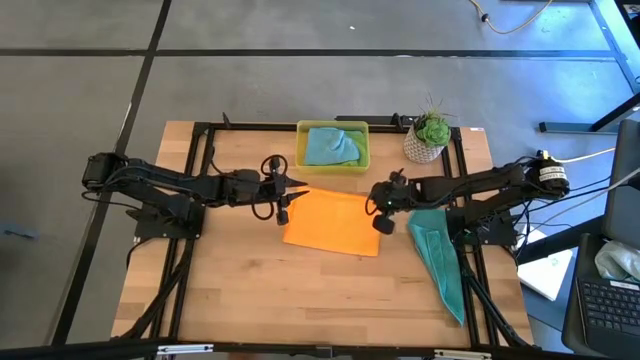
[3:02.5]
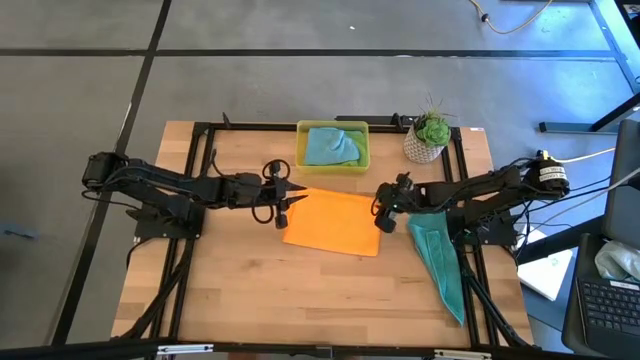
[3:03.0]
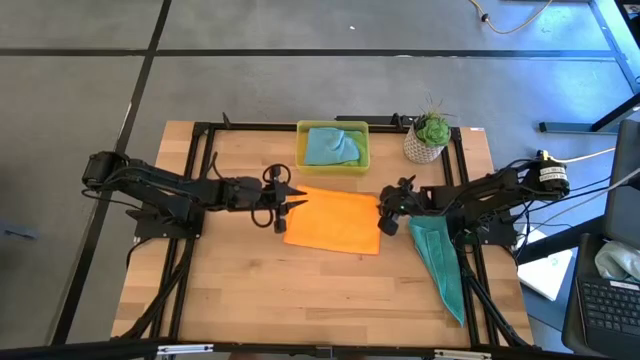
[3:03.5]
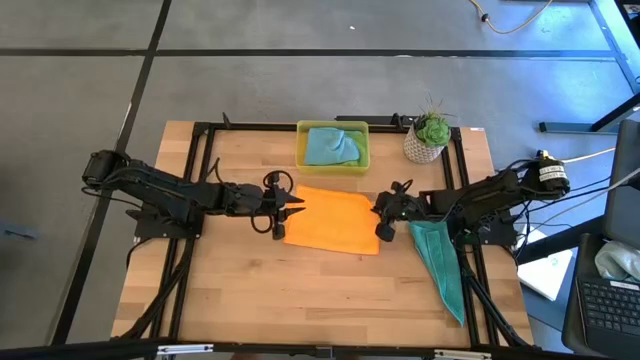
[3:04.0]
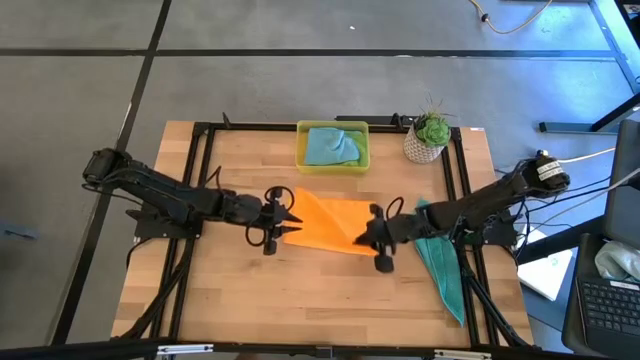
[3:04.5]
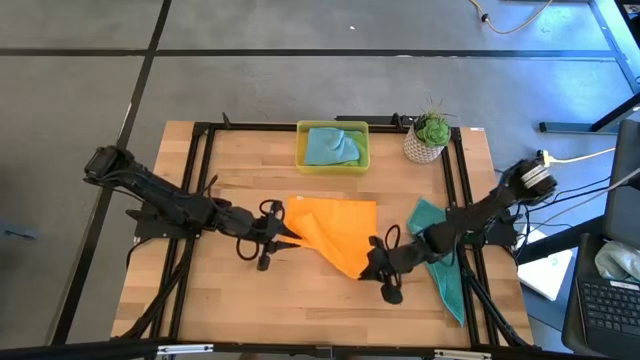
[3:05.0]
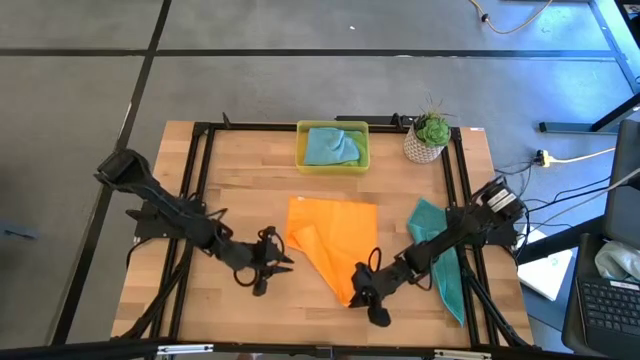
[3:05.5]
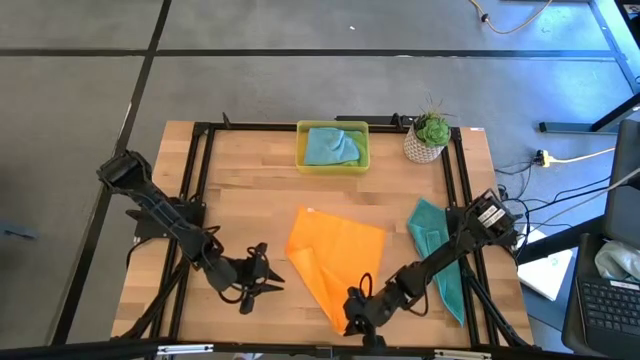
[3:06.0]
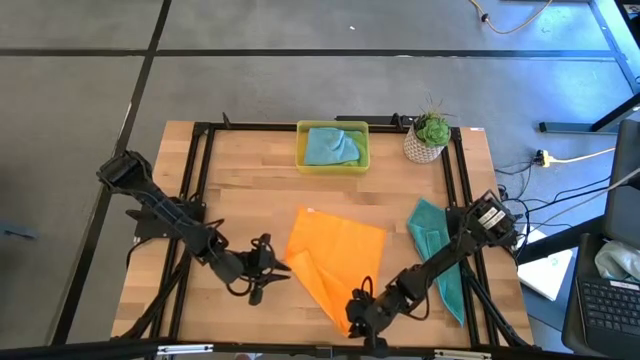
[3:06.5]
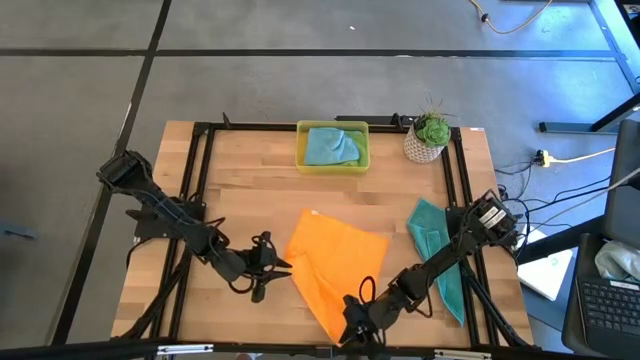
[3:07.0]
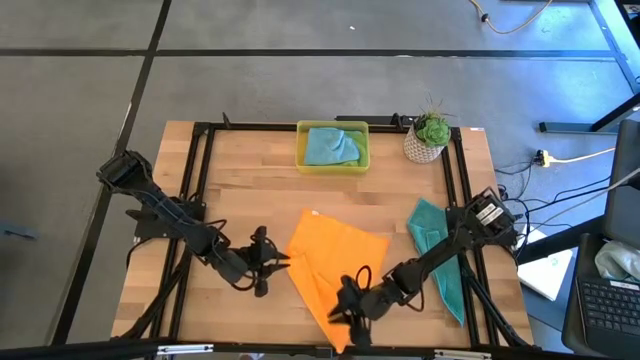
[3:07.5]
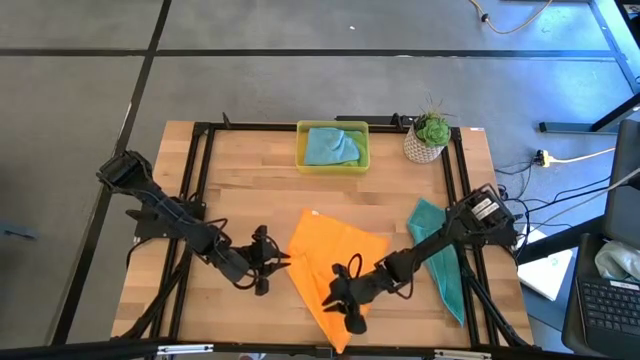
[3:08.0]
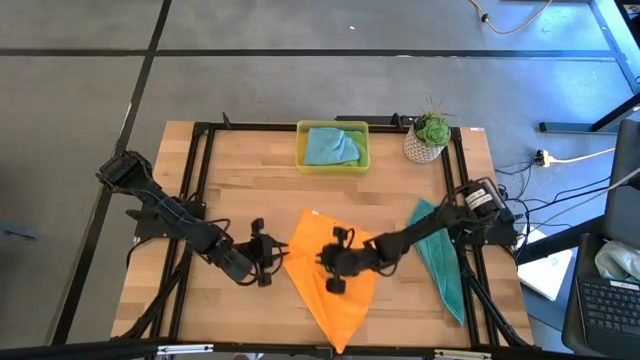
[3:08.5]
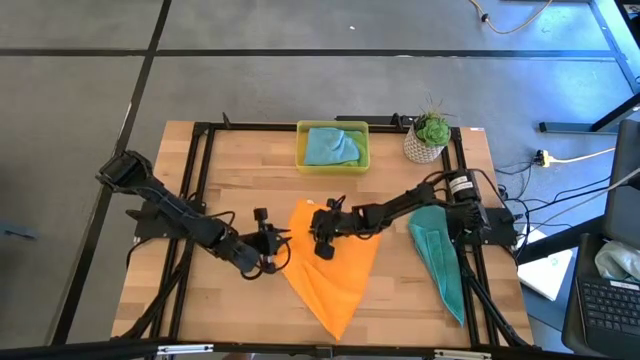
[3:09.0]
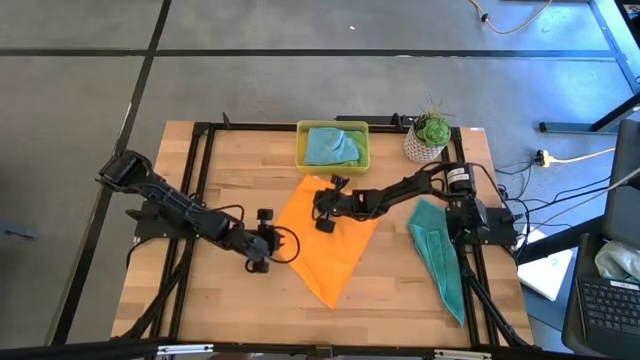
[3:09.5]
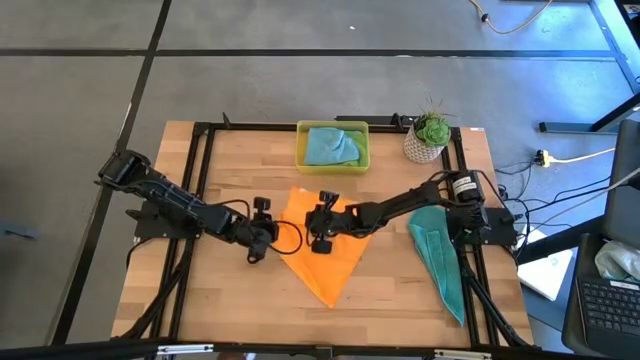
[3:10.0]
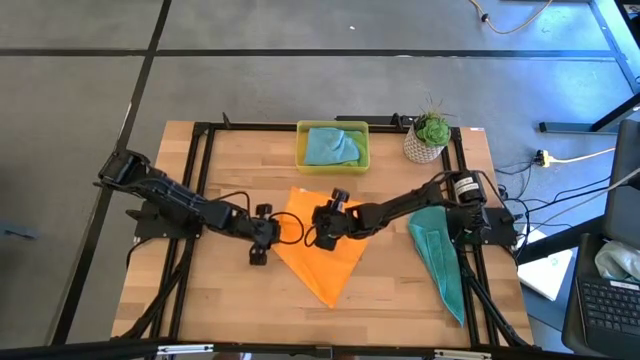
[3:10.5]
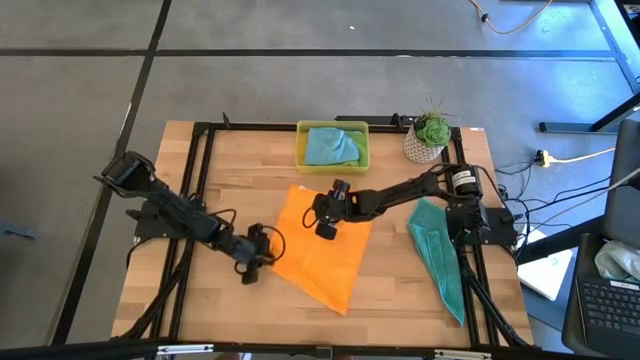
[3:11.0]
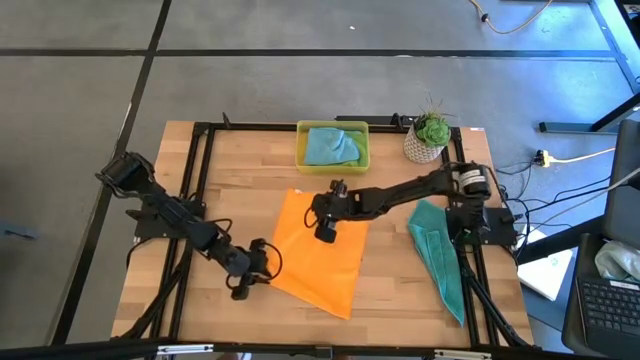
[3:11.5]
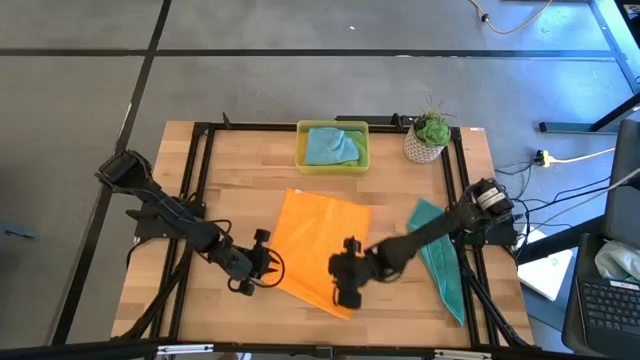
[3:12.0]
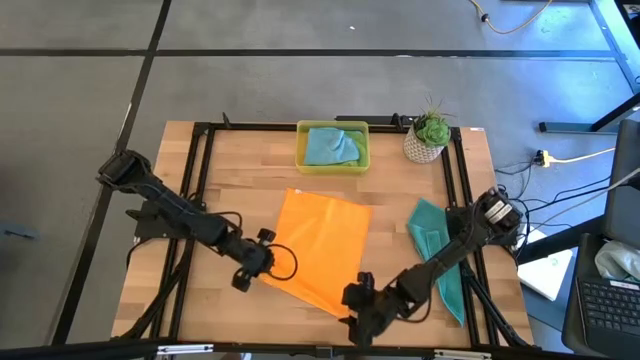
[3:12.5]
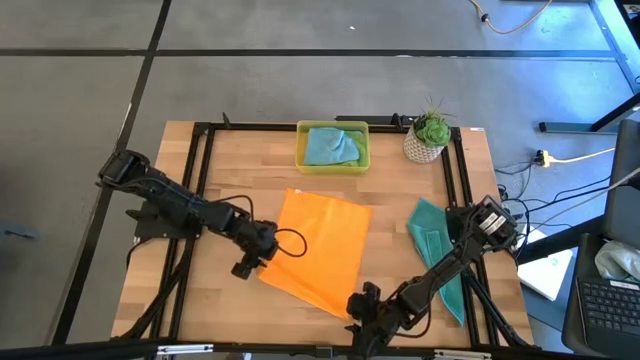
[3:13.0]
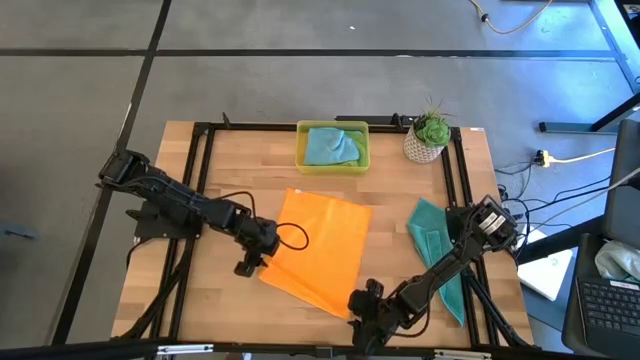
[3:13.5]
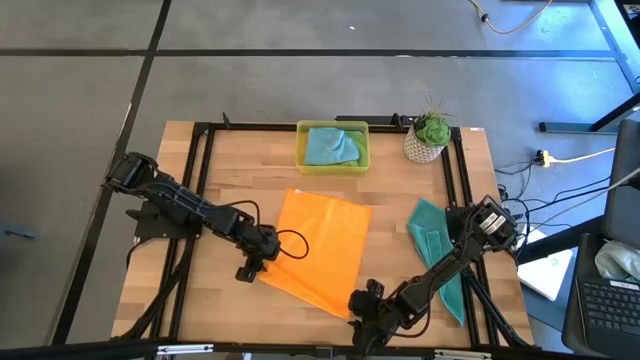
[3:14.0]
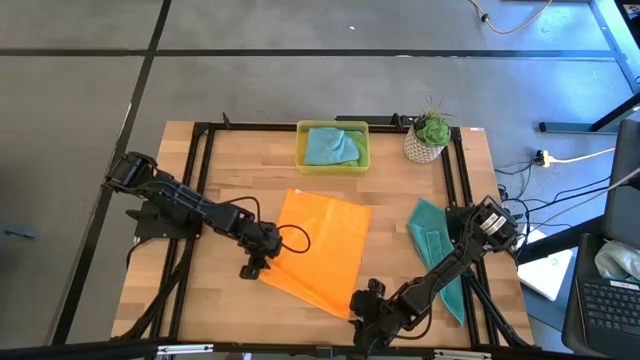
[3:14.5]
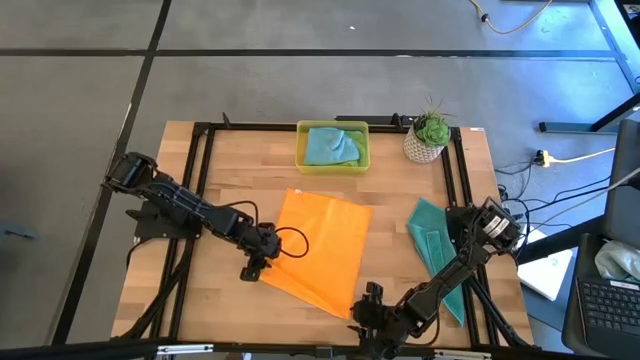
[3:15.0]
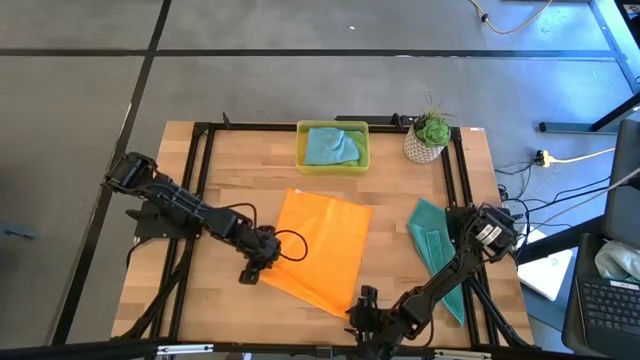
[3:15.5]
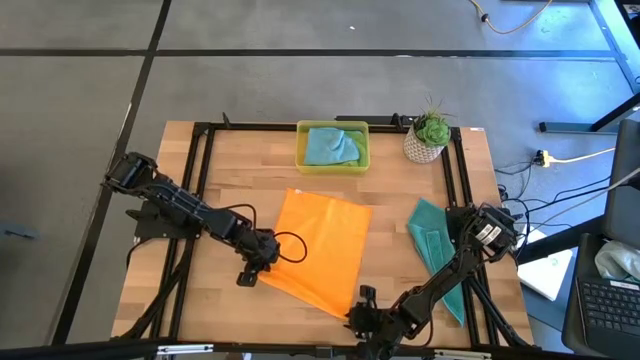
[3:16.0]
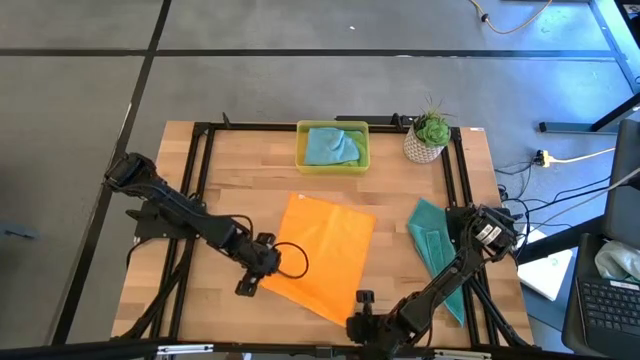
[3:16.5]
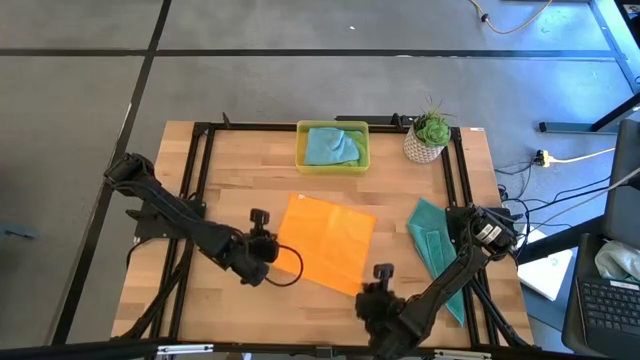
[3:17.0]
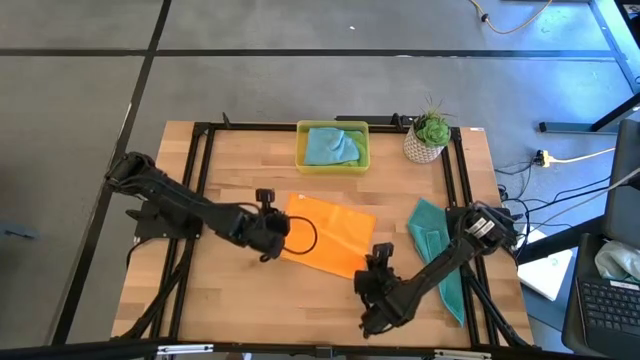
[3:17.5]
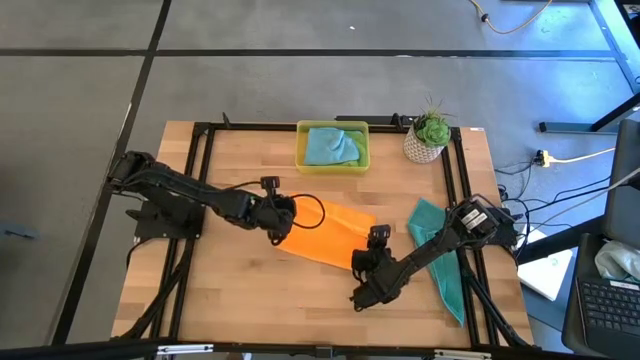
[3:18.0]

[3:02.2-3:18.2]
Task: Fold microfiber towels
Fold the orange cloth

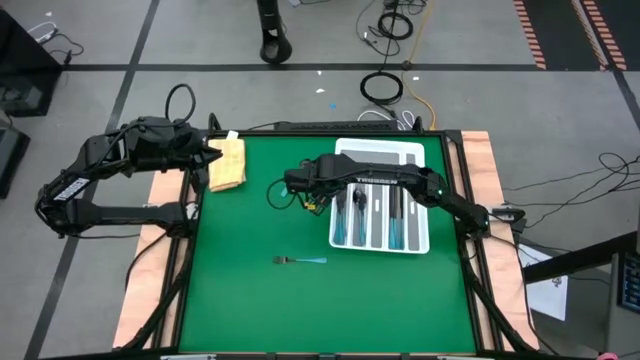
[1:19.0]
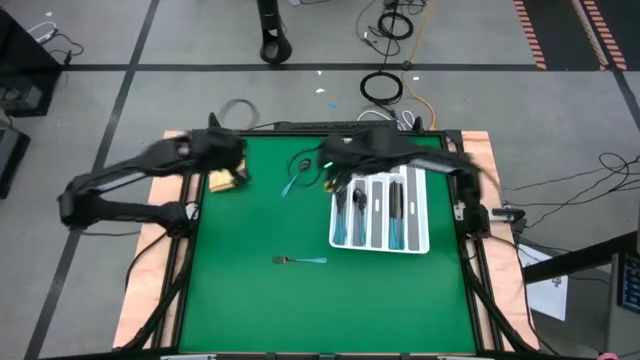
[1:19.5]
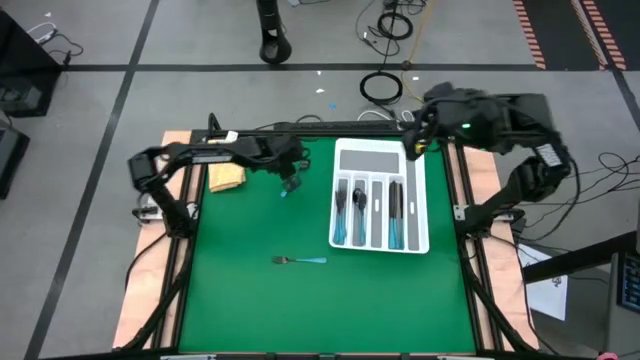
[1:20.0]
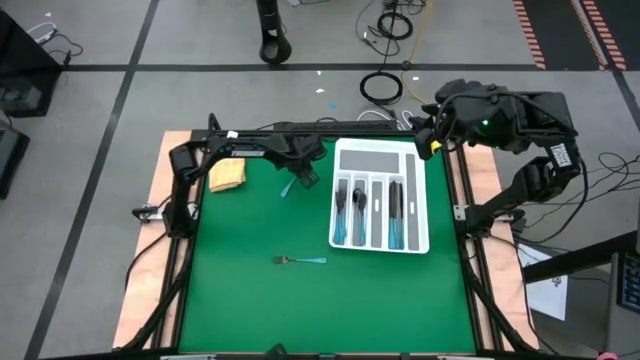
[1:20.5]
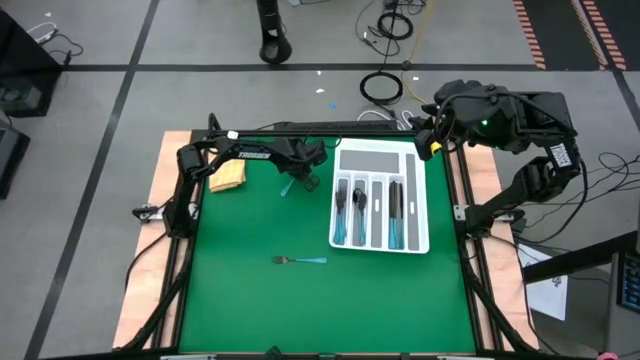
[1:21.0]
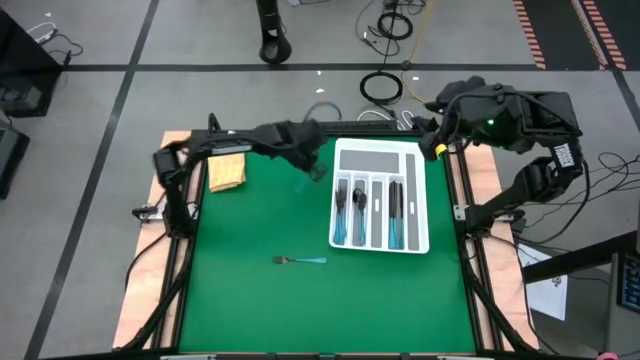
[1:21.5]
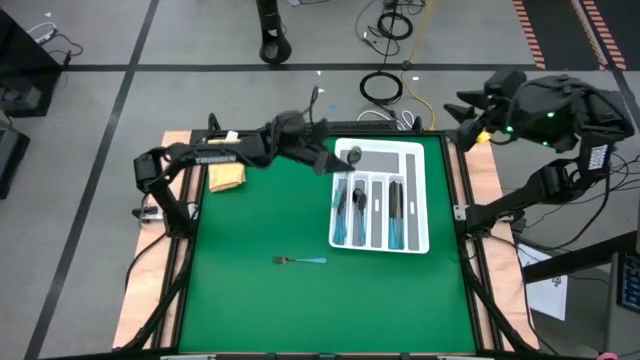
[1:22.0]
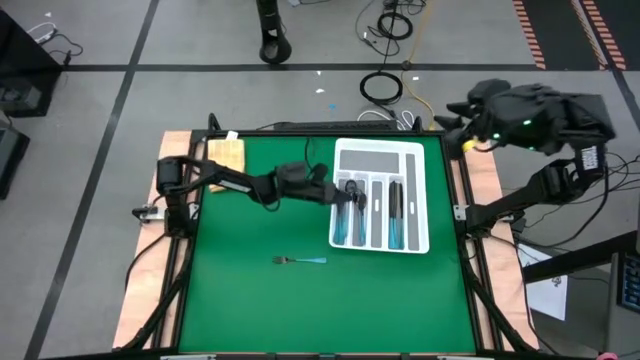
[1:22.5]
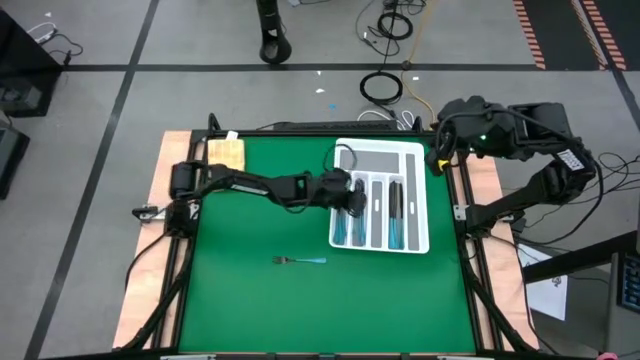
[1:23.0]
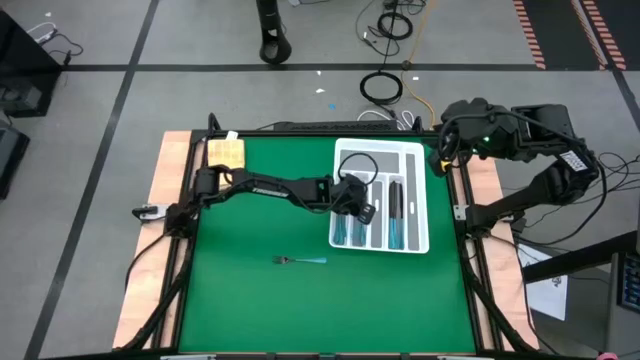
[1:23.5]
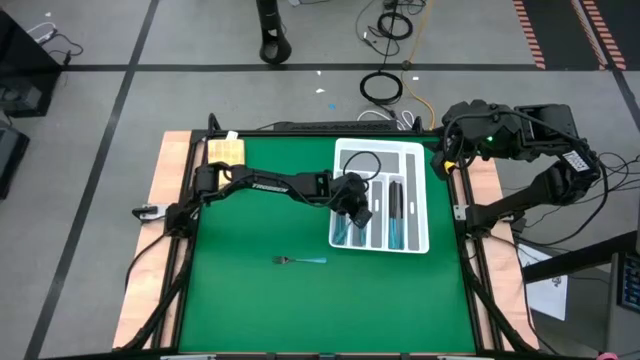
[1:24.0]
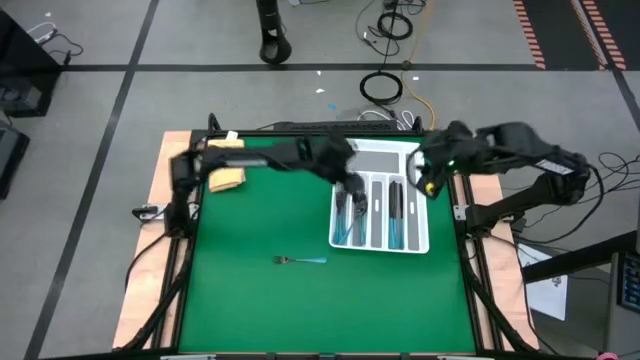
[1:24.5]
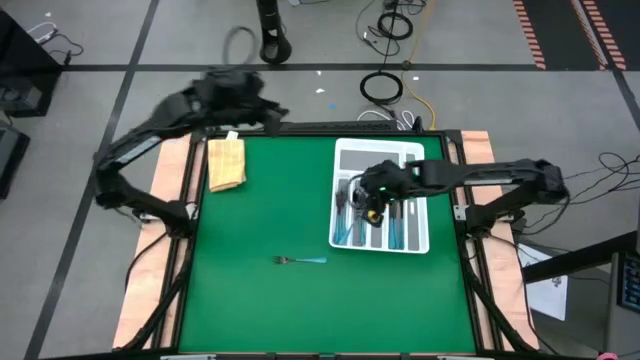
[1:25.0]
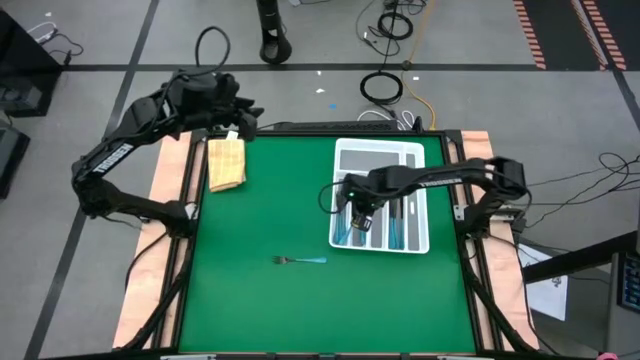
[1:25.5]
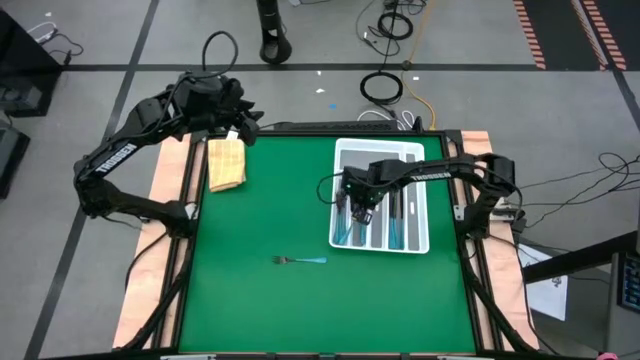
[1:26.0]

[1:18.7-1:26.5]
Task: Sort silverware
Put the blue spoon into the silverware tray with the other blue spoons
